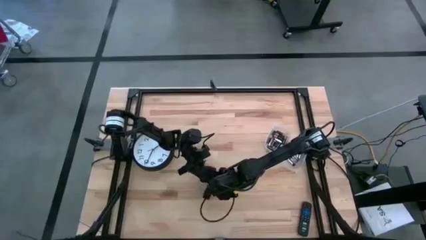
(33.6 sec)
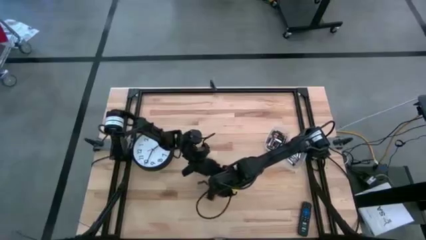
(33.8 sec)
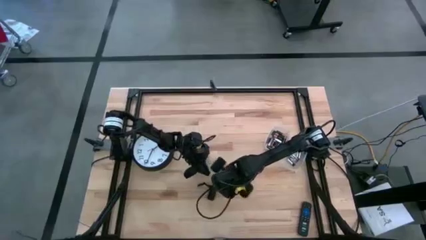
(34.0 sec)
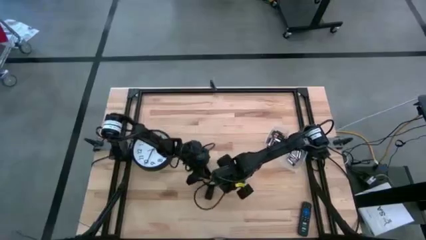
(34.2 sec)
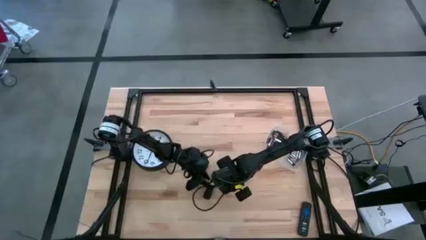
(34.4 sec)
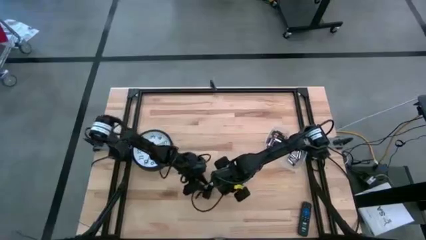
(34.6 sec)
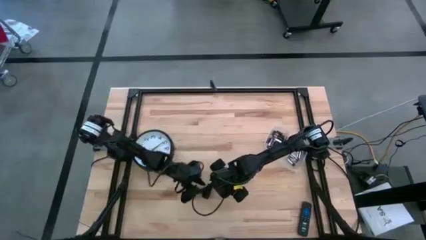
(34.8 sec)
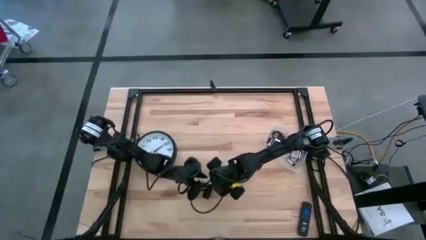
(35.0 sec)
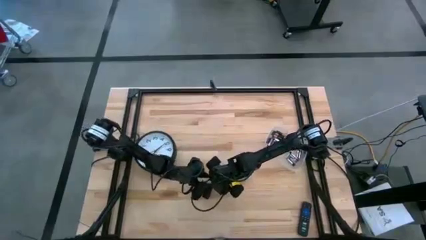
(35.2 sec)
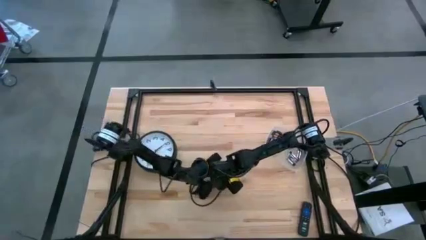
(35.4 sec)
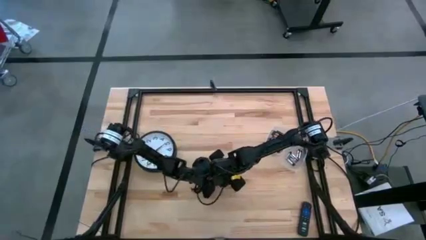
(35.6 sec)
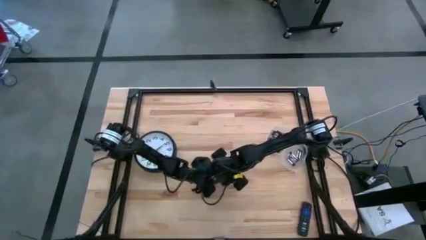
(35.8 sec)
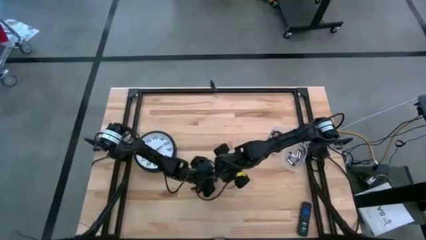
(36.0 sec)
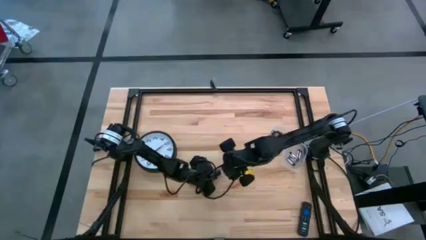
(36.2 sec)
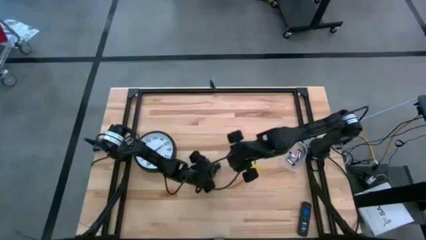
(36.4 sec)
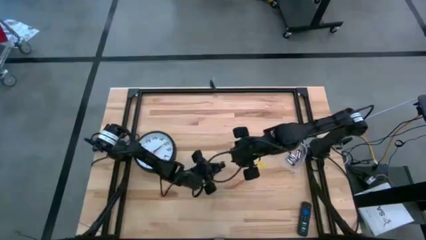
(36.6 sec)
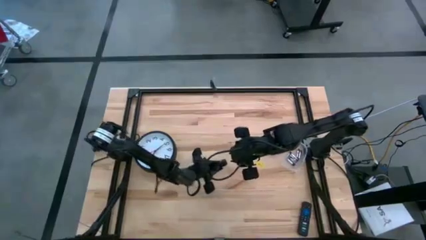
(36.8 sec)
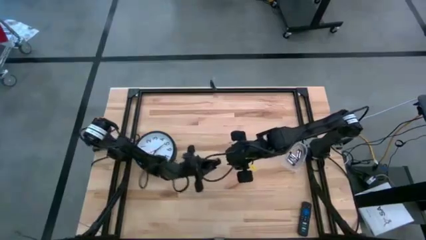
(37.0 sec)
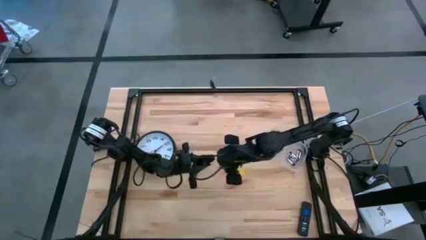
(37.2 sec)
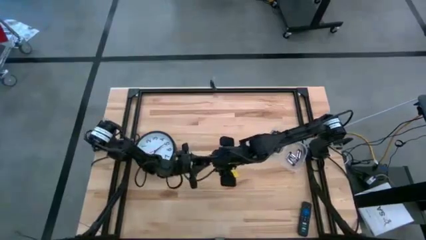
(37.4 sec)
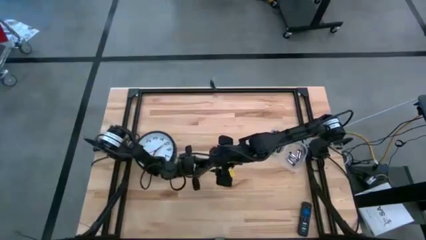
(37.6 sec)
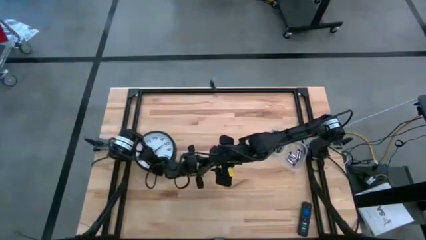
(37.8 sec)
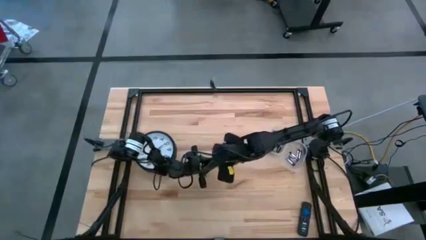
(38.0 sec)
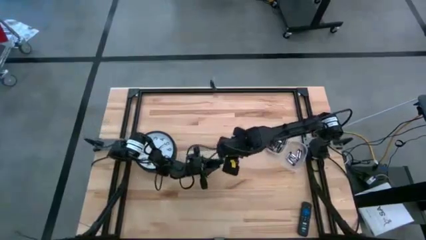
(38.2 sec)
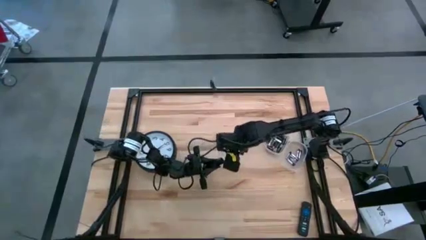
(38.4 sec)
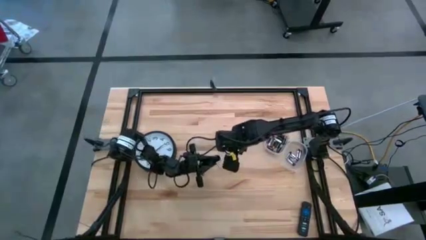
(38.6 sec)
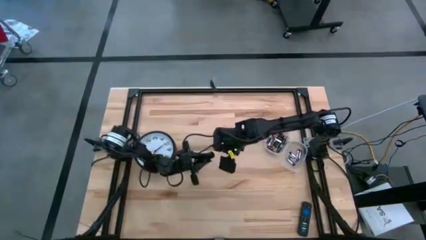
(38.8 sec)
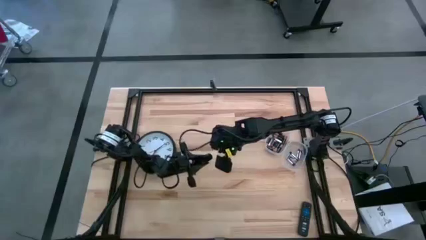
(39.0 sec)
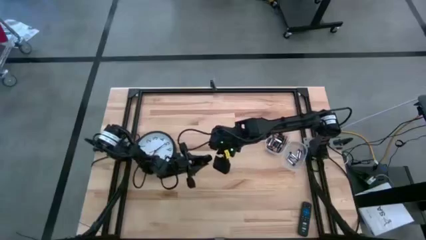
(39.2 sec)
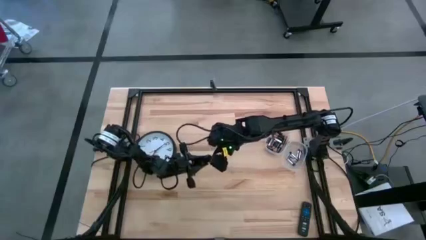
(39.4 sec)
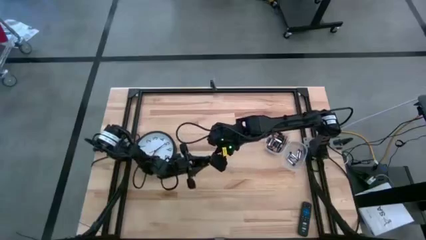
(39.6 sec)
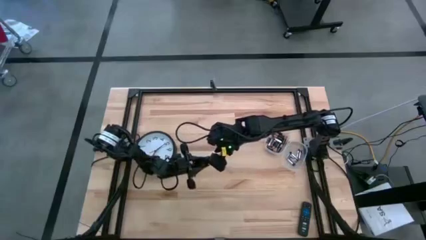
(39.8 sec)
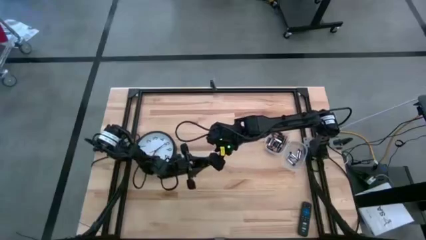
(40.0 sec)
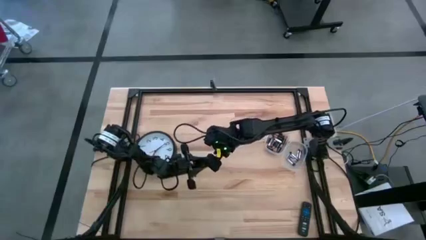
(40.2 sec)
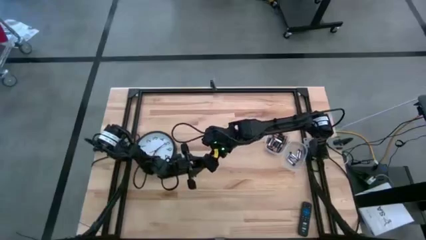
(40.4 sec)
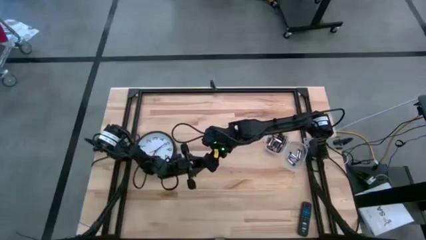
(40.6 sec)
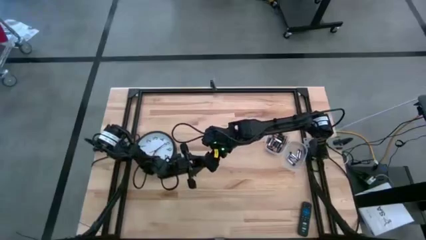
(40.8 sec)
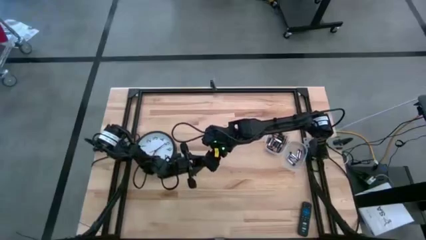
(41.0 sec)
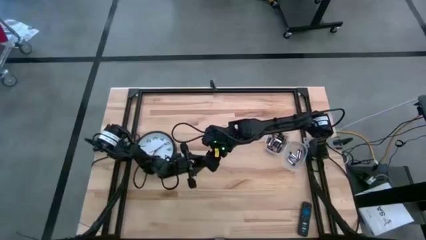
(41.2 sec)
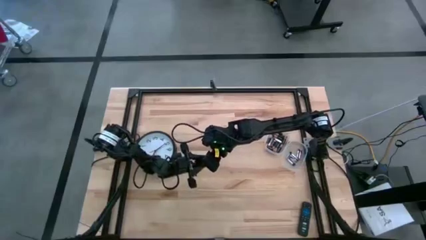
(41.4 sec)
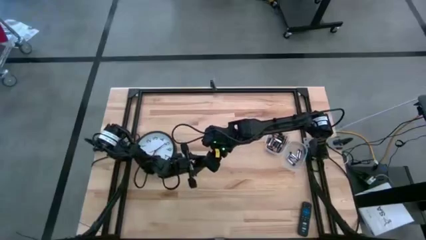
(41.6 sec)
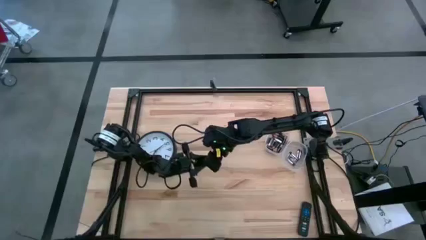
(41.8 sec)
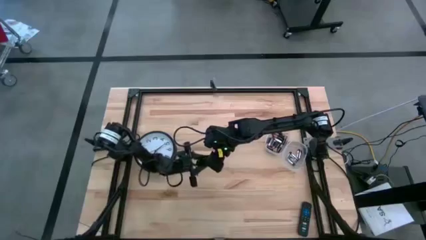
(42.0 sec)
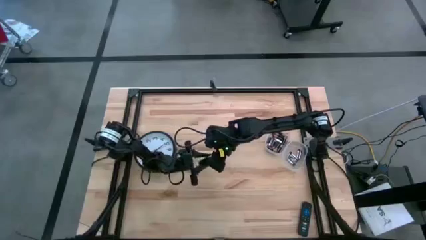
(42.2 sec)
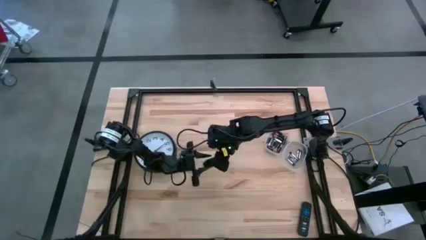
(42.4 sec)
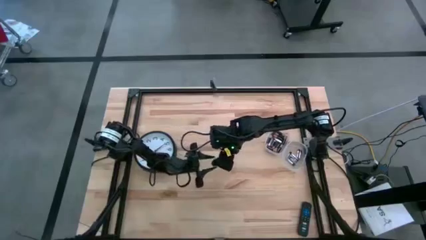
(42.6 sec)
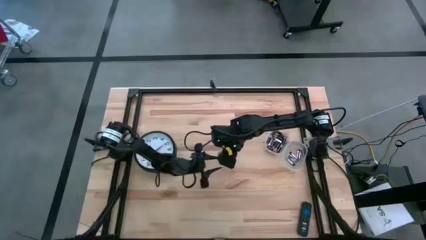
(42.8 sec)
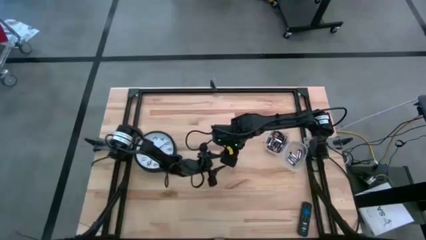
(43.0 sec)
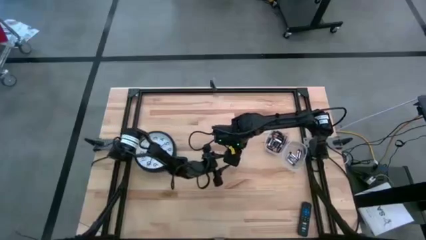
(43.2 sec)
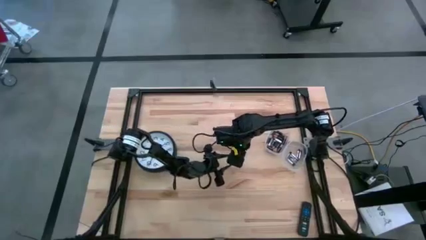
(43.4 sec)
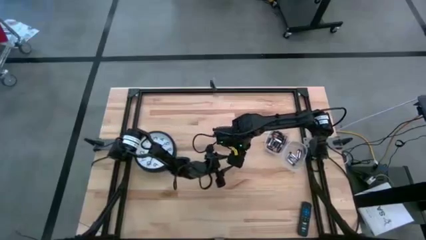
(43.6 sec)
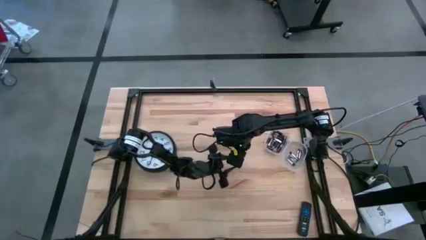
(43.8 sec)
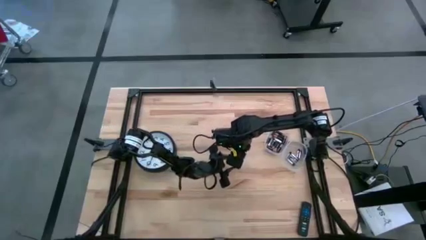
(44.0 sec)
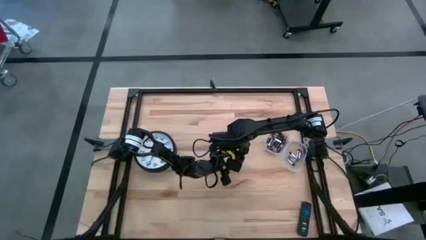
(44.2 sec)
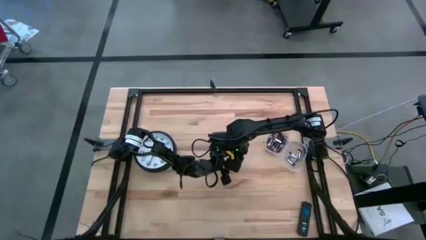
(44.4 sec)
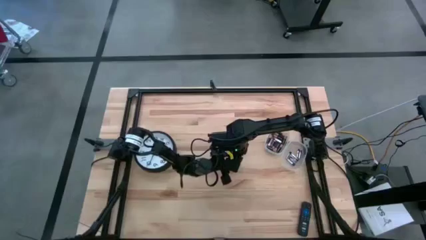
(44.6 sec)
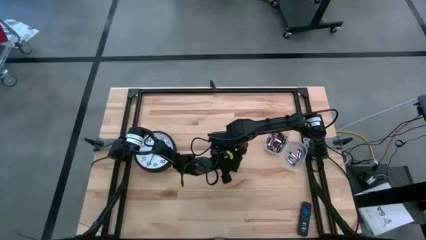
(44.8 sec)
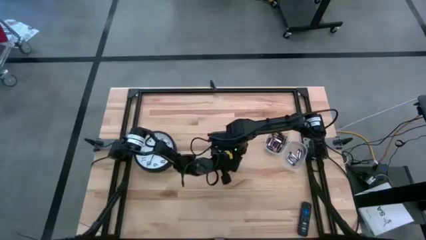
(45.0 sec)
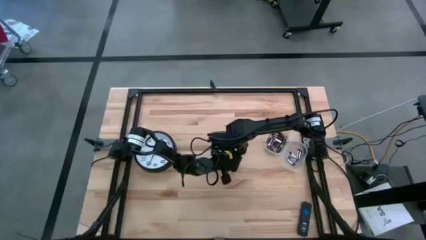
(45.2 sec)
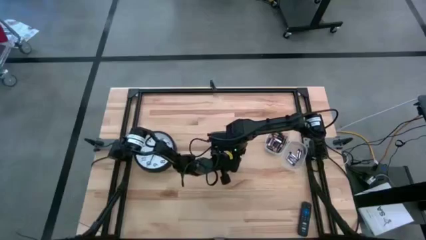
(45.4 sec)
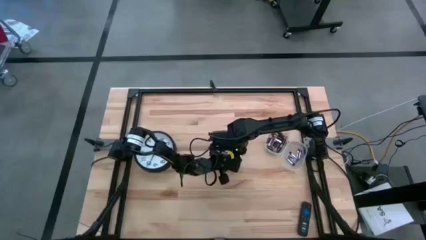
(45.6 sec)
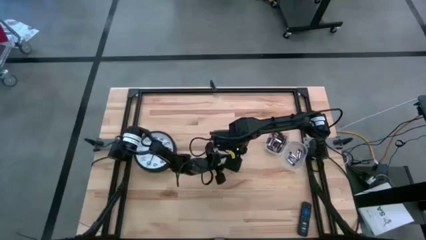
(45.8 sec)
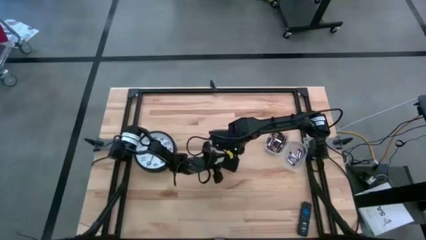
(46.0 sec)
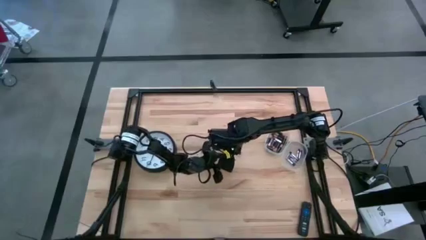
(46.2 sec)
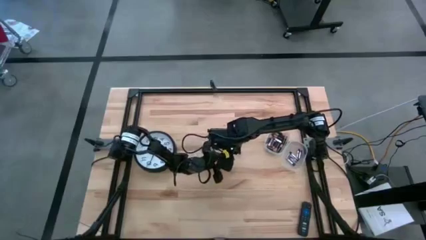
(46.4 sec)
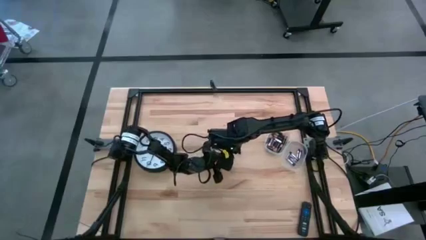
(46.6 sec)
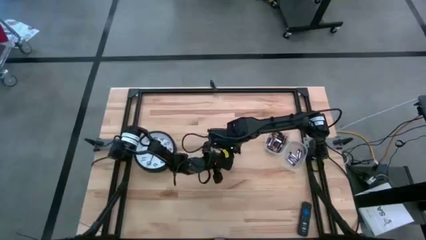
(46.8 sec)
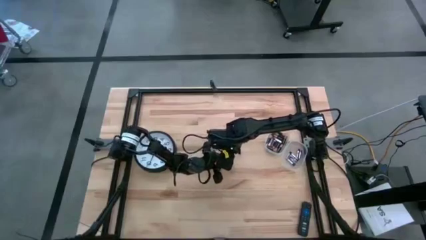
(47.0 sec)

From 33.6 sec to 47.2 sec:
Task: Insert battery
Open the black flashlight battery compartment

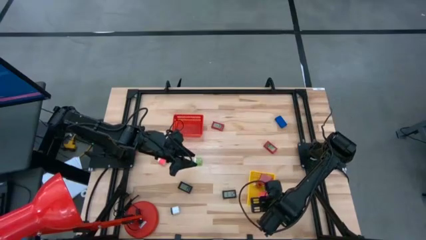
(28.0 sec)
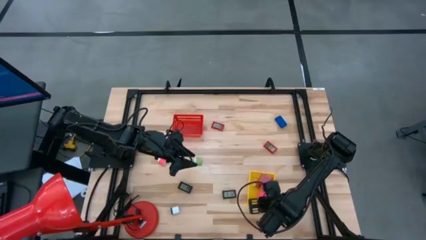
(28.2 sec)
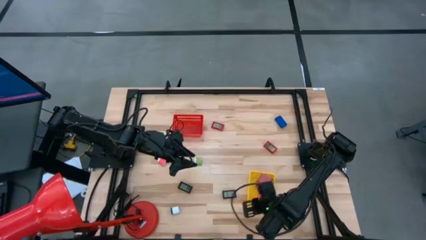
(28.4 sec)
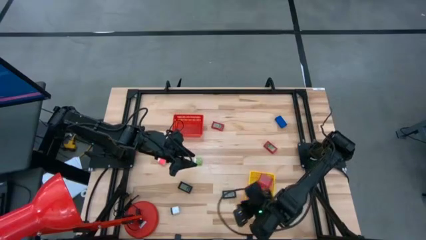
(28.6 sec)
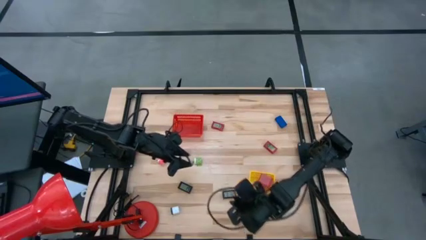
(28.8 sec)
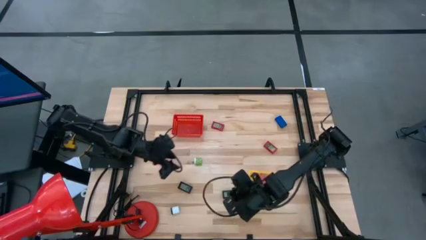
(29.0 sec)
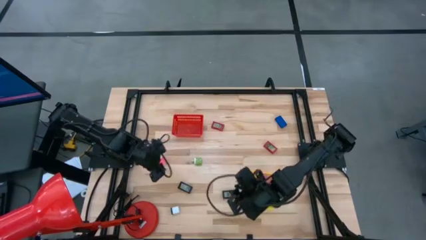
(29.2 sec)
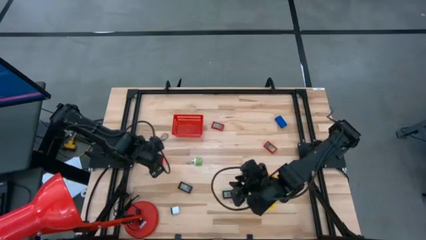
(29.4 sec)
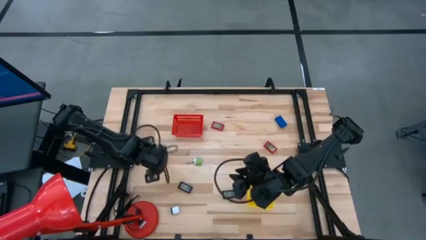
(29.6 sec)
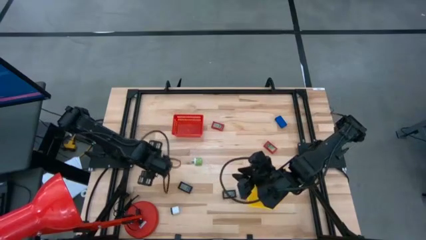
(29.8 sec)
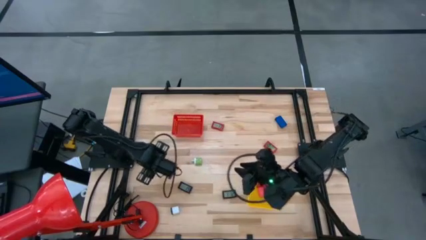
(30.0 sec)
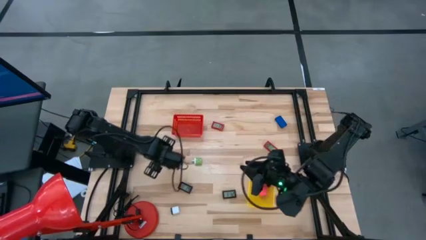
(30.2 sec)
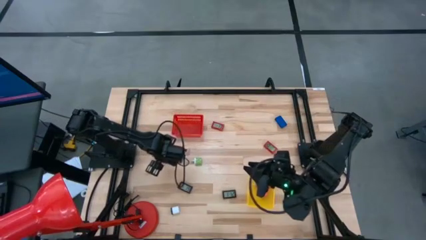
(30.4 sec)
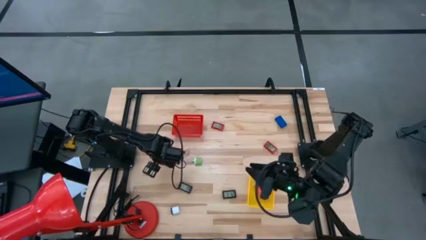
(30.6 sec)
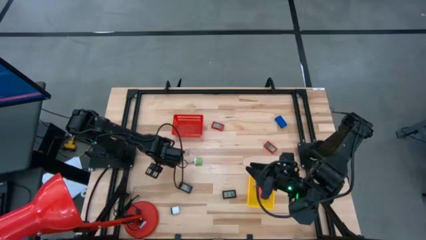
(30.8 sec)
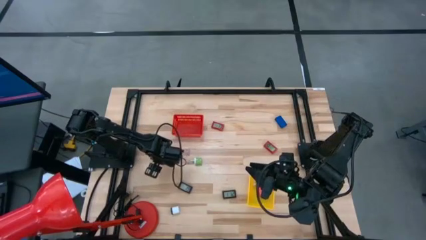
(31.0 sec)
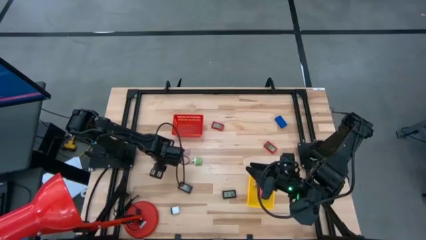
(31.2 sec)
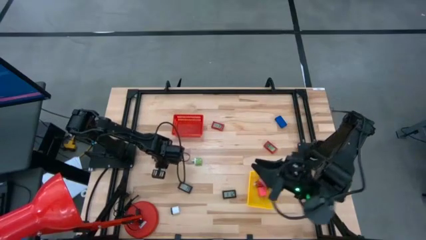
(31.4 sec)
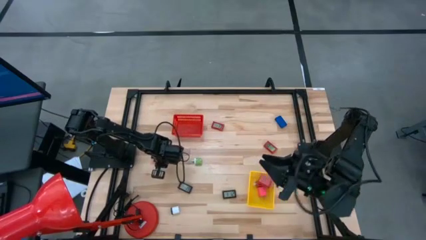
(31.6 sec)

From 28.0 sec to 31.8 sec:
Task: Pick & Place Office items
Put the pink charger adapter into the yellow basket
